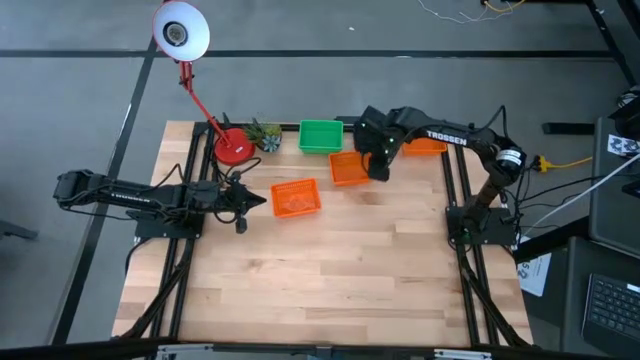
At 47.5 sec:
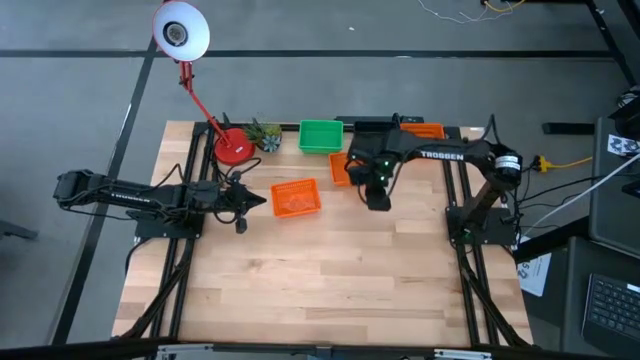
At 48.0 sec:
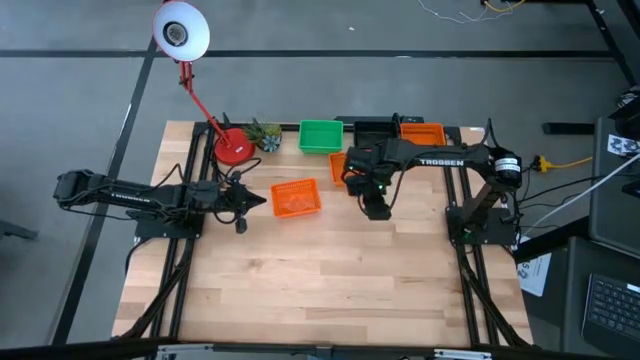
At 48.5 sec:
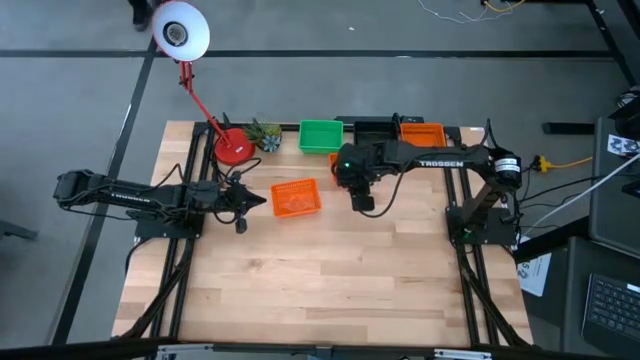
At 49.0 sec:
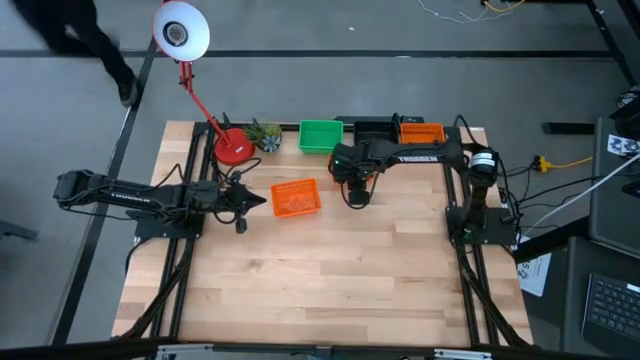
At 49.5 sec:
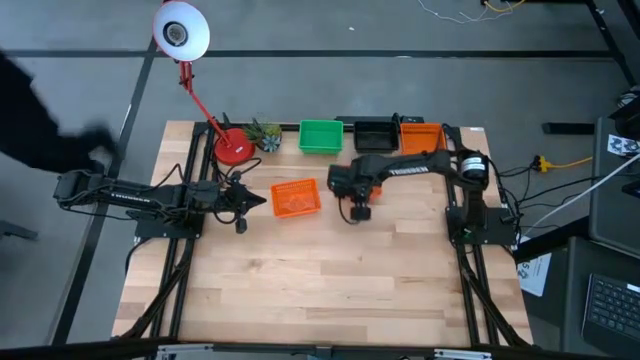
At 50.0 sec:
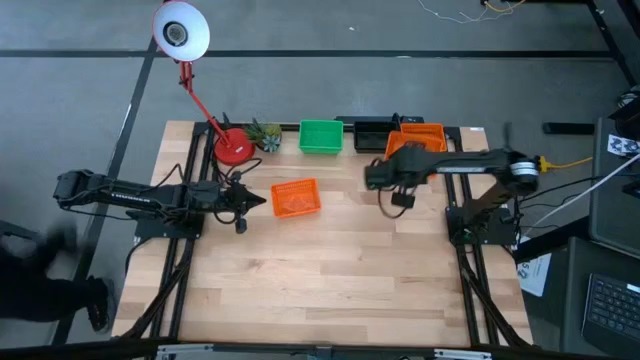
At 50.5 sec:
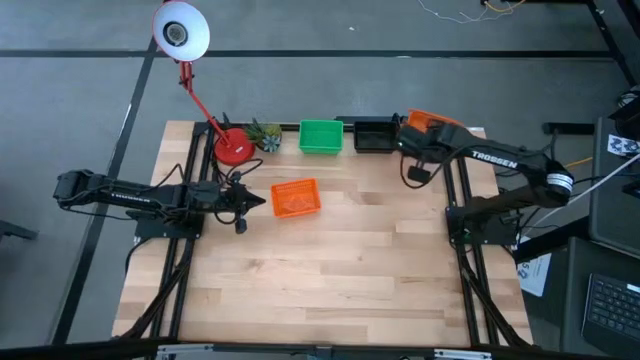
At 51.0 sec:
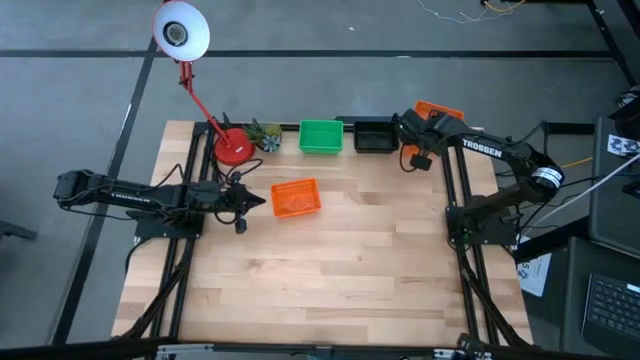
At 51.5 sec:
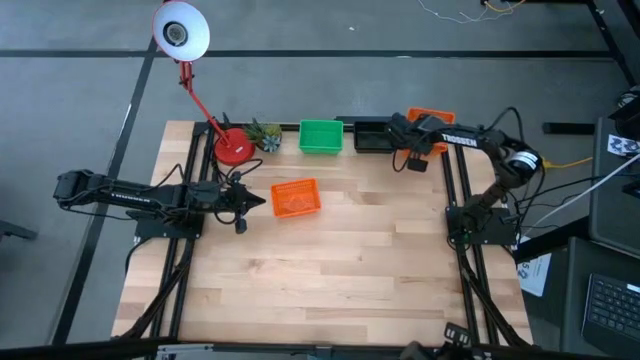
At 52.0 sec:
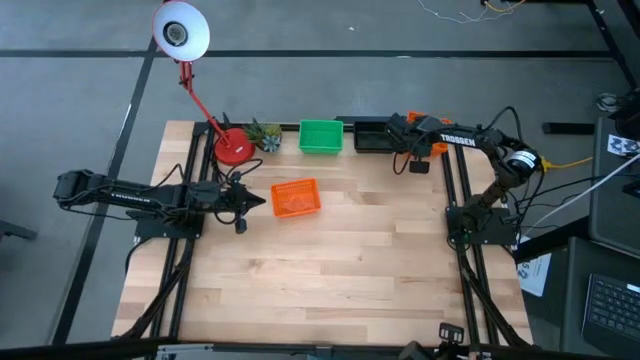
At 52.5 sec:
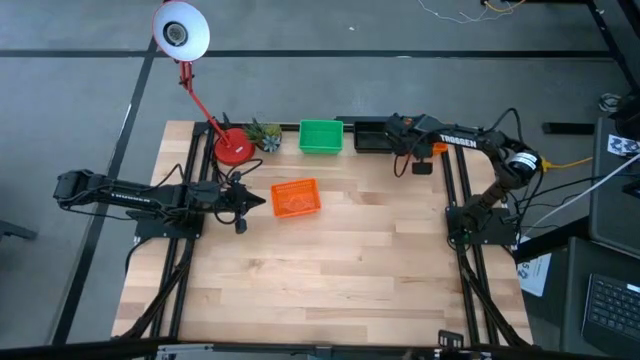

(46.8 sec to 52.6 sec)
Stack the middle orange bin on top of the top orange bin

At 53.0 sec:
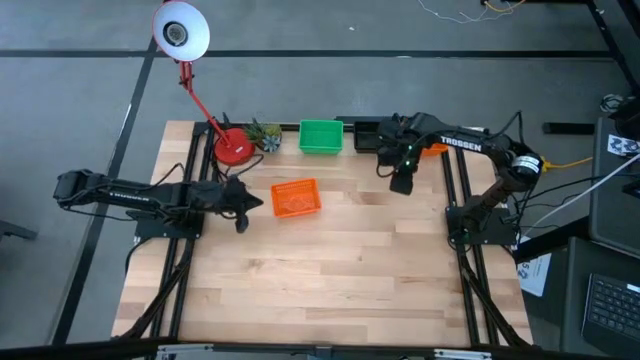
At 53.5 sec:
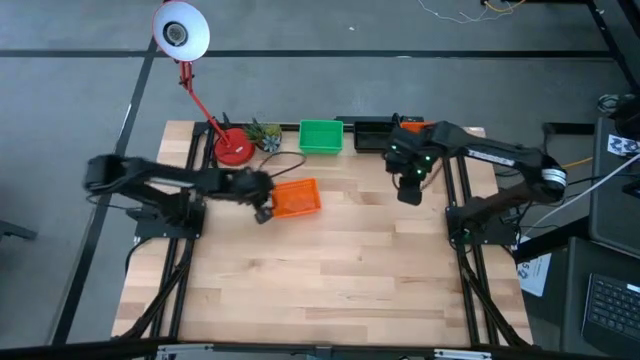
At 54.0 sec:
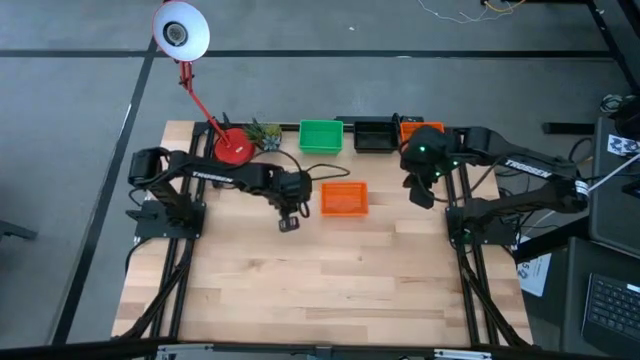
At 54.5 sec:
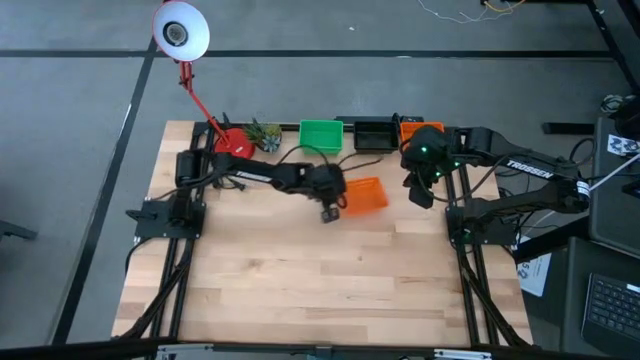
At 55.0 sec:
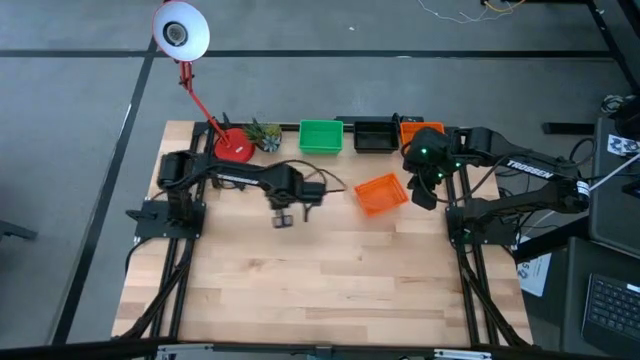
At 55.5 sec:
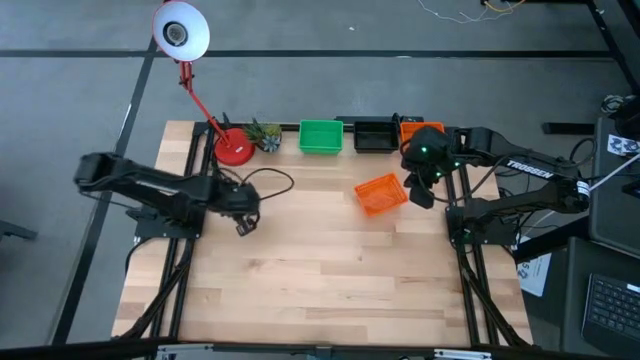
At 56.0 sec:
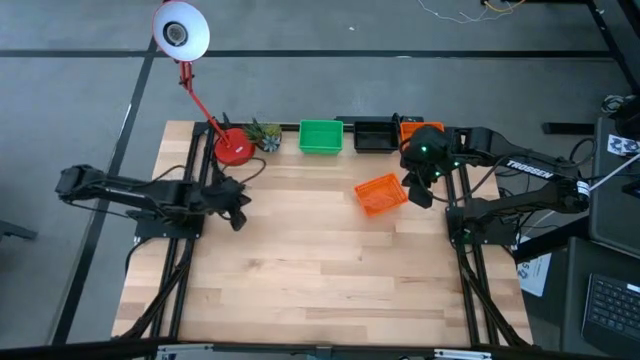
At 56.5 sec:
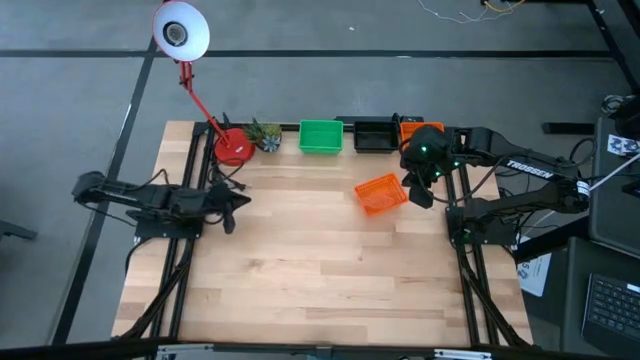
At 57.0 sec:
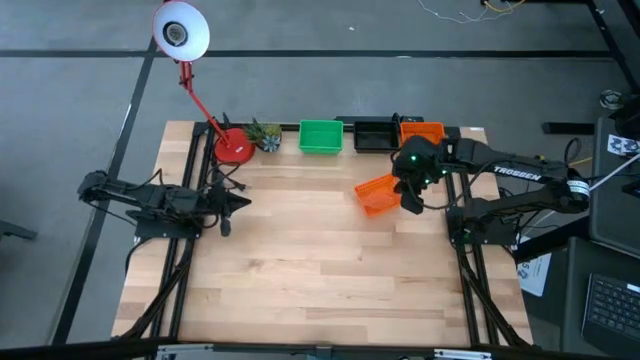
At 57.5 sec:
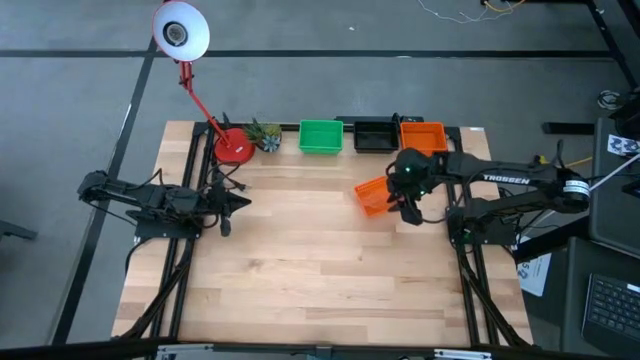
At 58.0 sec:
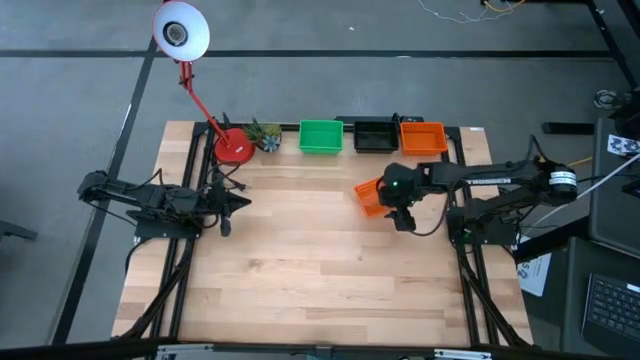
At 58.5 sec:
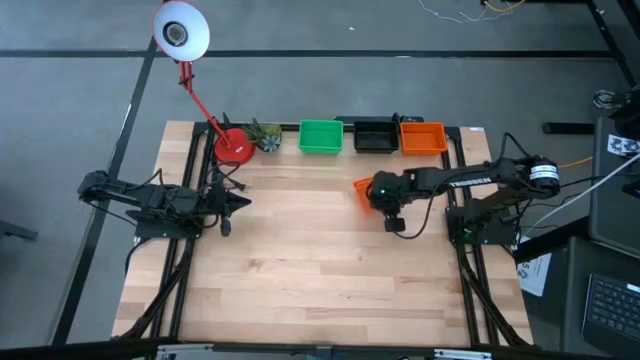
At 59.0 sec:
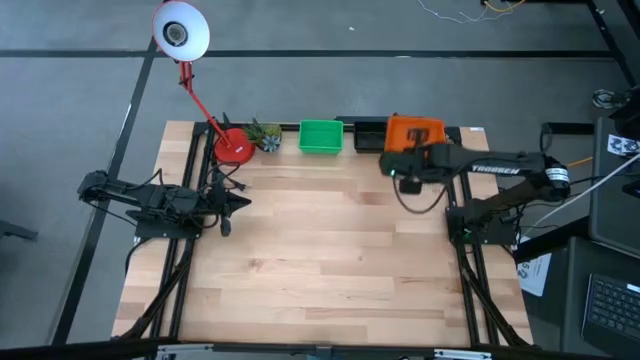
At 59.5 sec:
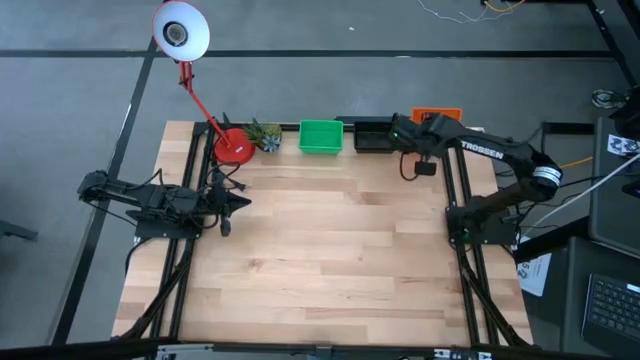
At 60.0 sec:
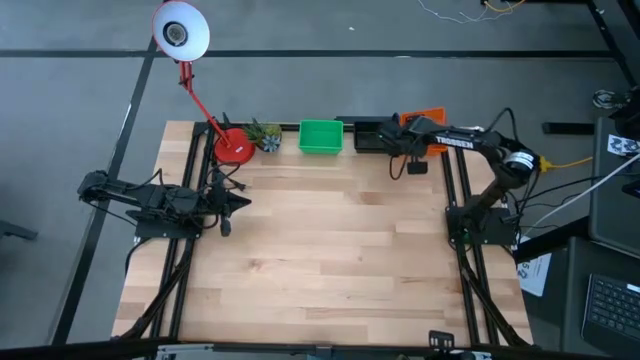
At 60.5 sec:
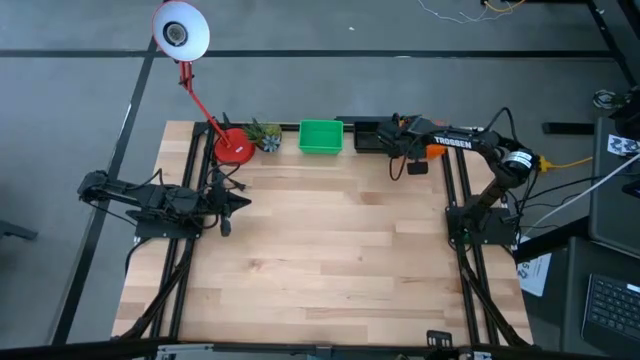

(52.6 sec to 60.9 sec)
Stack the bottom orange bin on top of the right orange bin

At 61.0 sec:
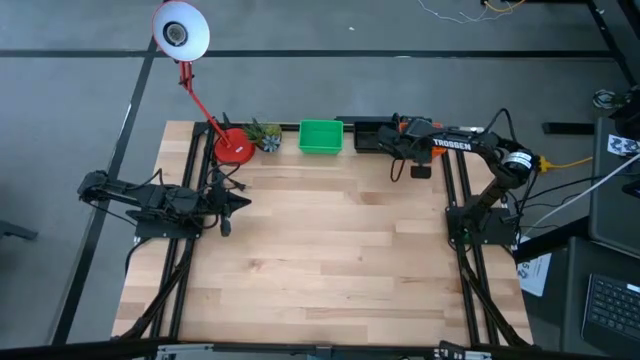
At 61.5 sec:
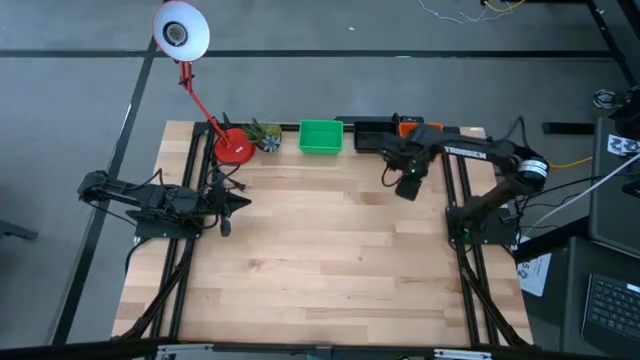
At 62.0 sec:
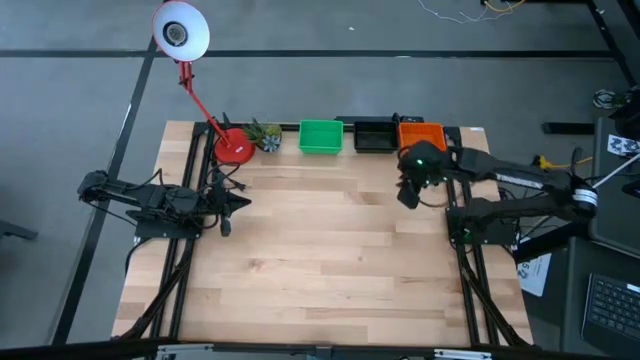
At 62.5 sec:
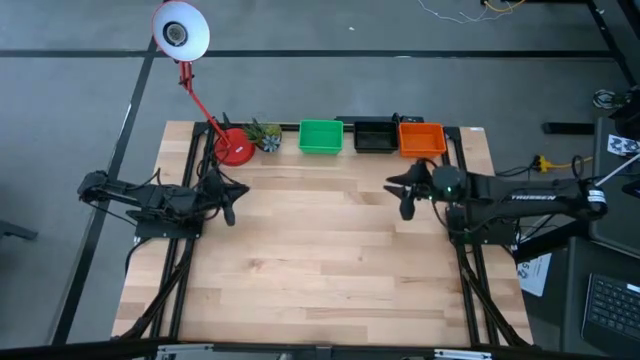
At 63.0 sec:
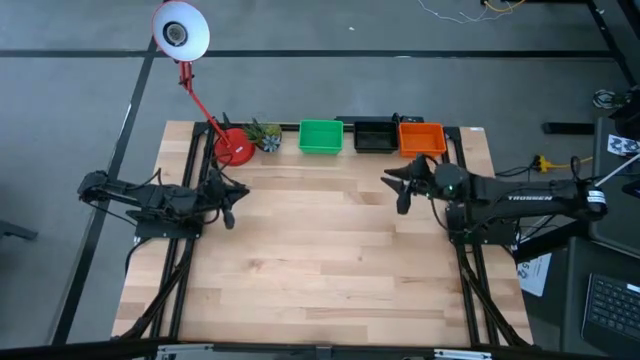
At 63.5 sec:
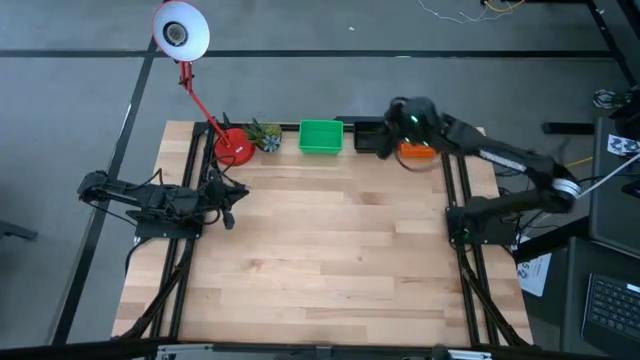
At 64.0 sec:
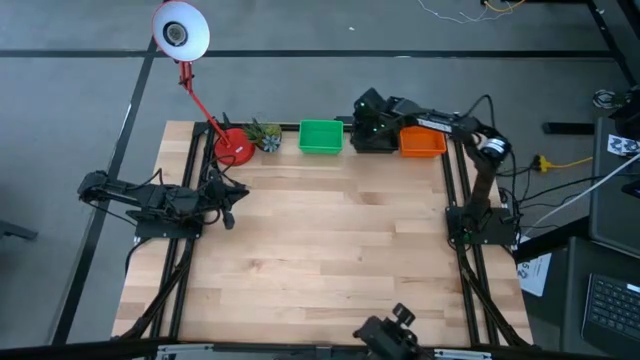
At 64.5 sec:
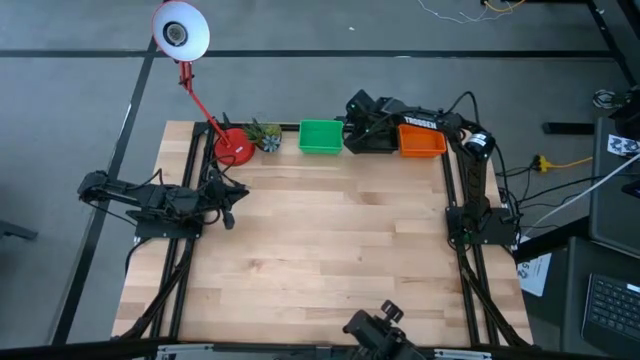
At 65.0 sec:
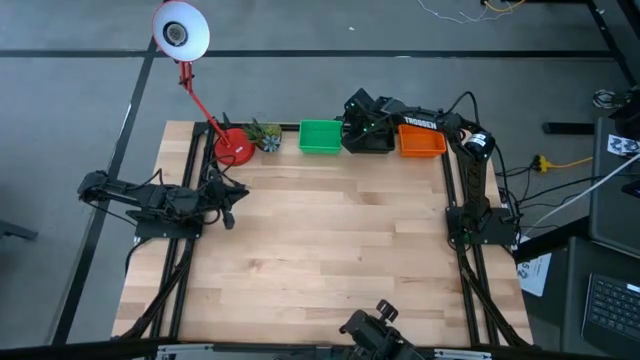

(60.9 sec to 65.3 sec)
Adjust the stack of black bins

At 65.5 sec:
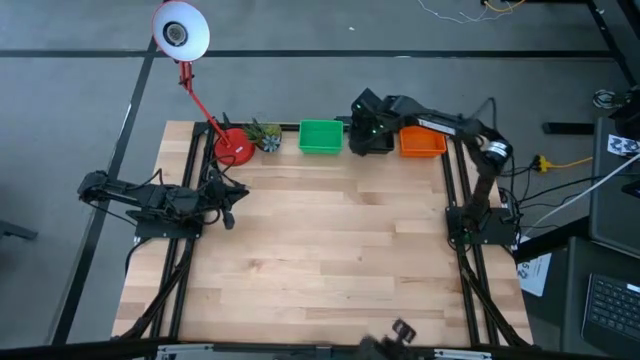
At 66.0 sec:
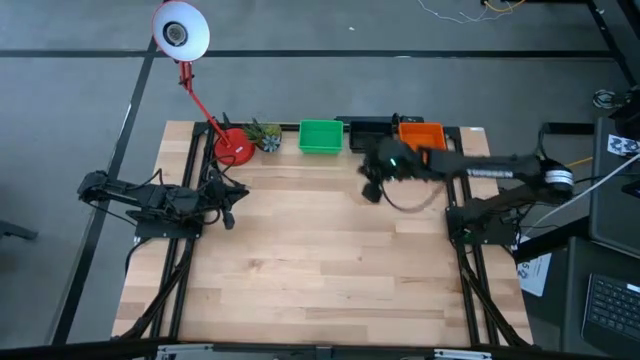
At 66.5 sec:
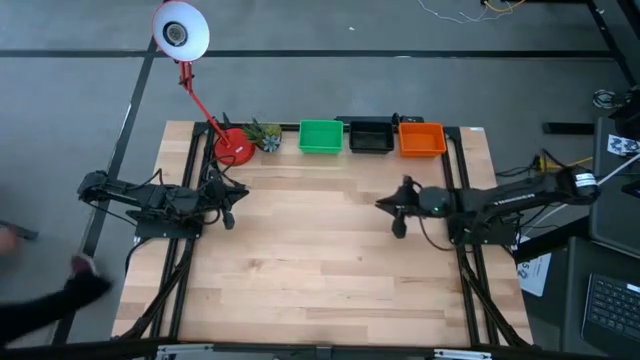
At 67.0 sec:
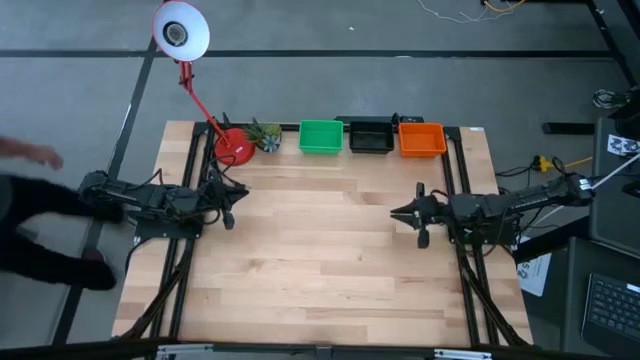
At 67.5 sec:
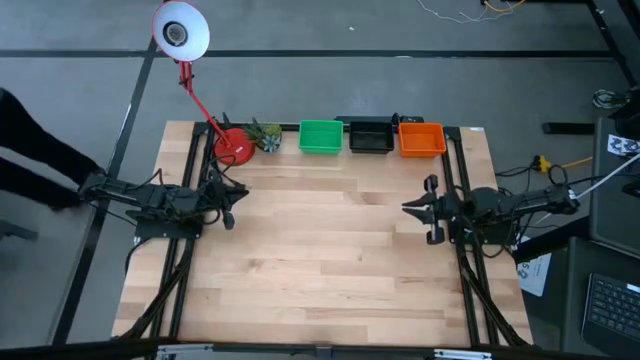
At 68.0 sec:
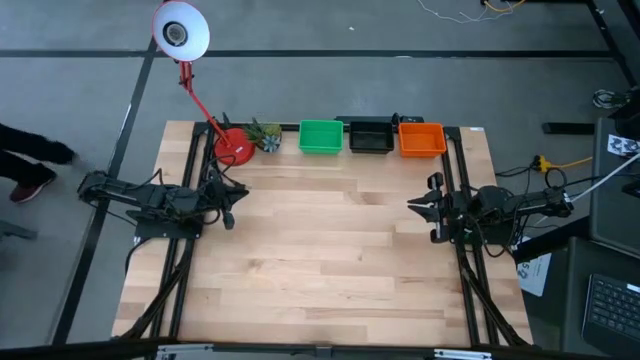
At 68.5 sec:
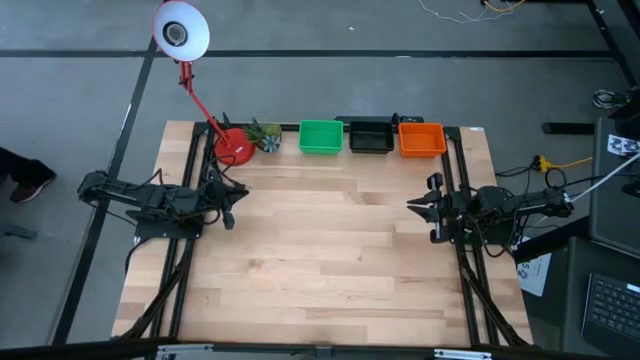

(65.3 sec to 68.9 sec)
Return to Home Position
